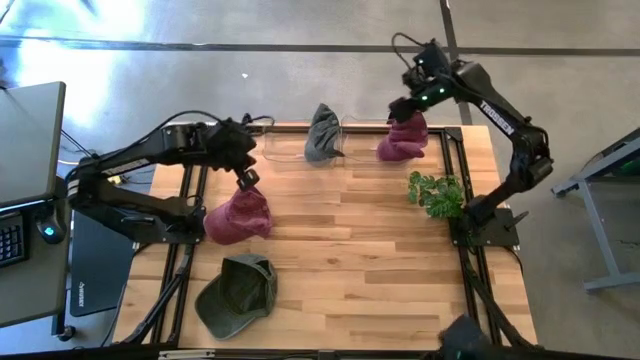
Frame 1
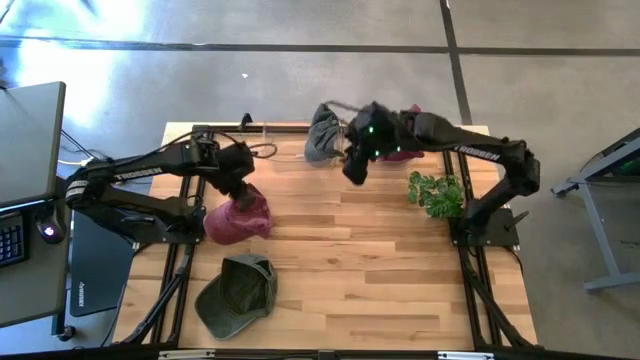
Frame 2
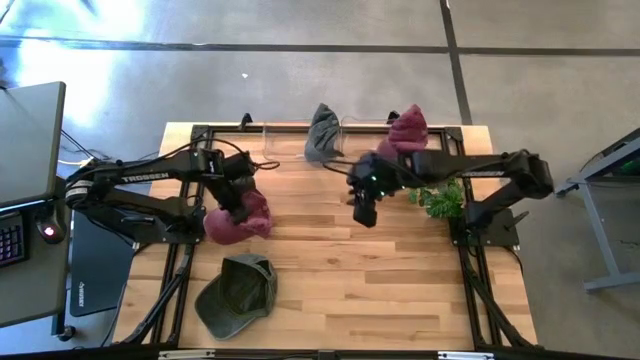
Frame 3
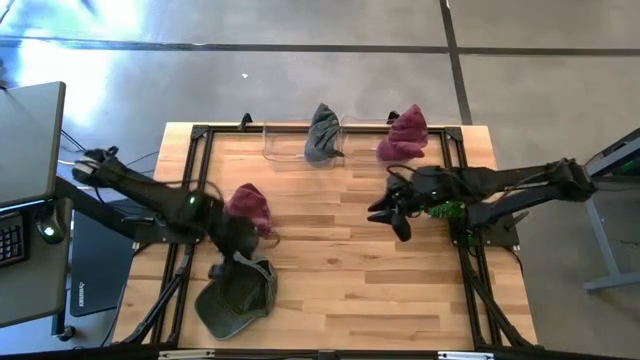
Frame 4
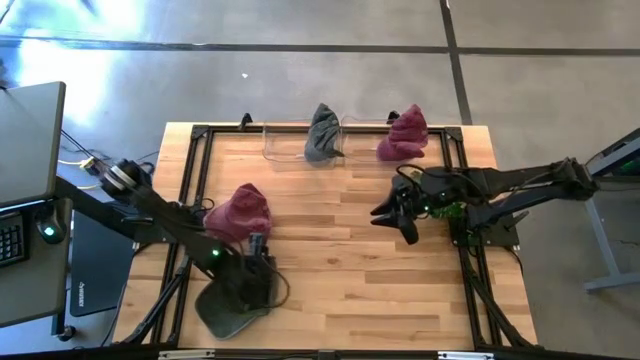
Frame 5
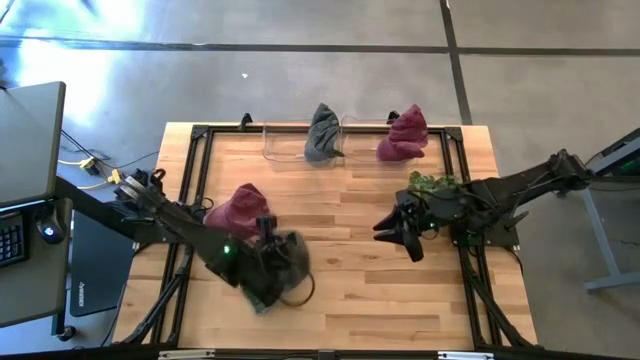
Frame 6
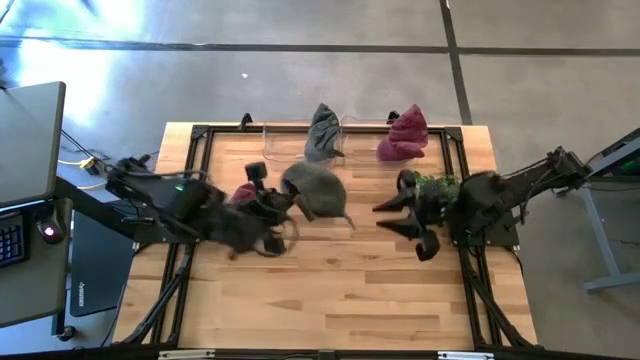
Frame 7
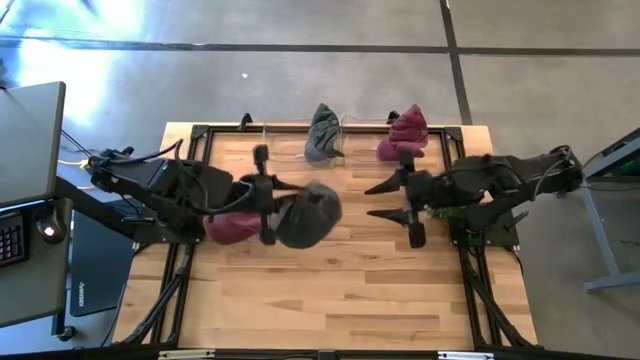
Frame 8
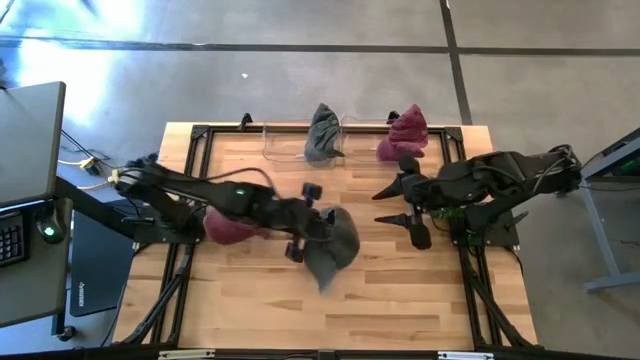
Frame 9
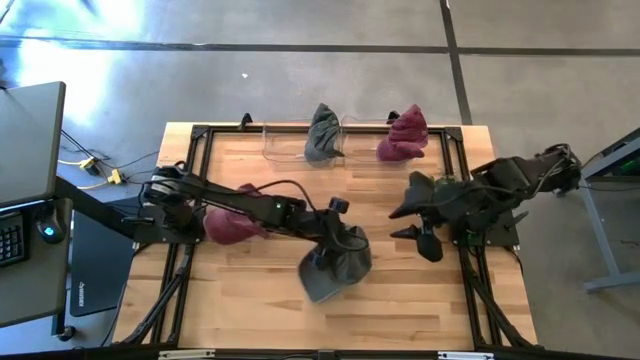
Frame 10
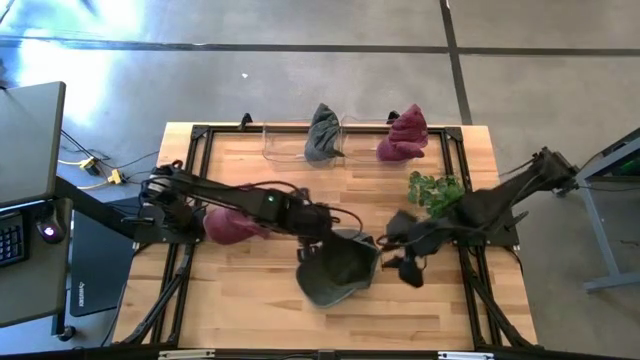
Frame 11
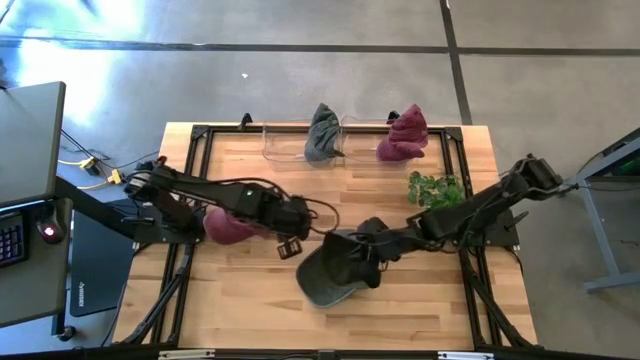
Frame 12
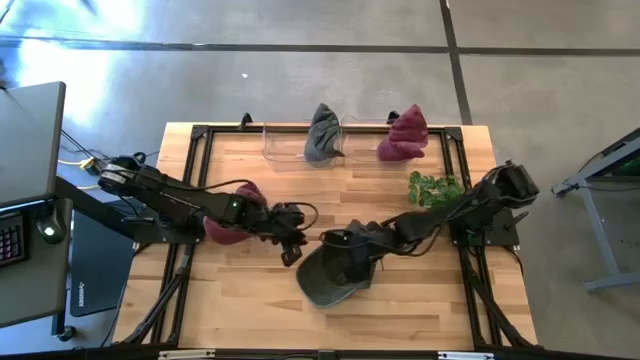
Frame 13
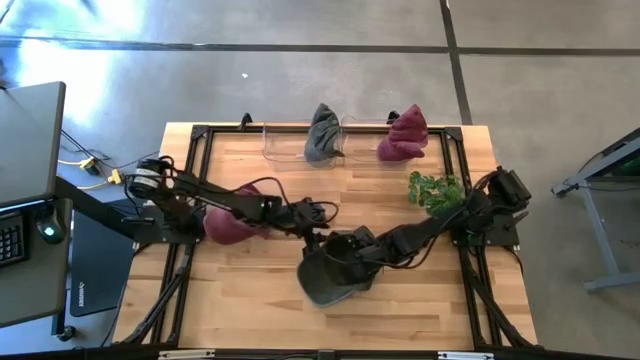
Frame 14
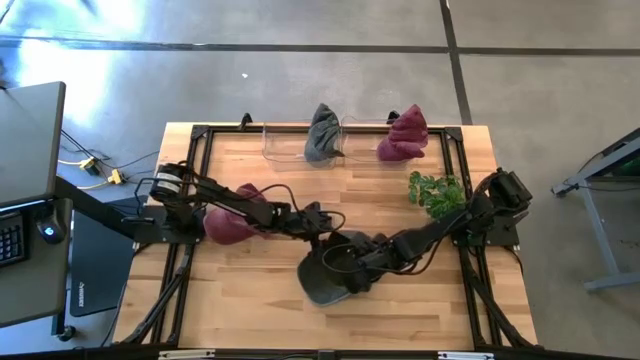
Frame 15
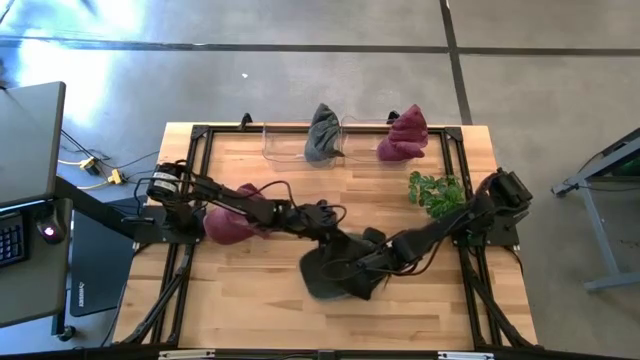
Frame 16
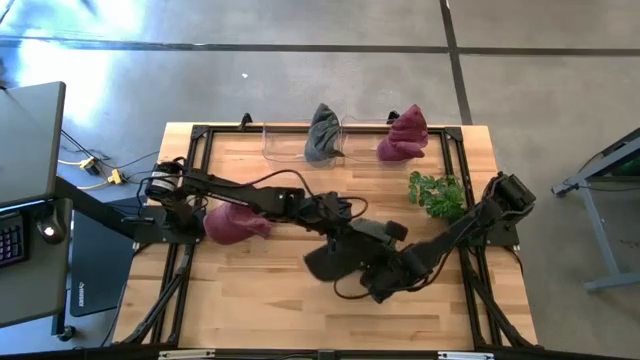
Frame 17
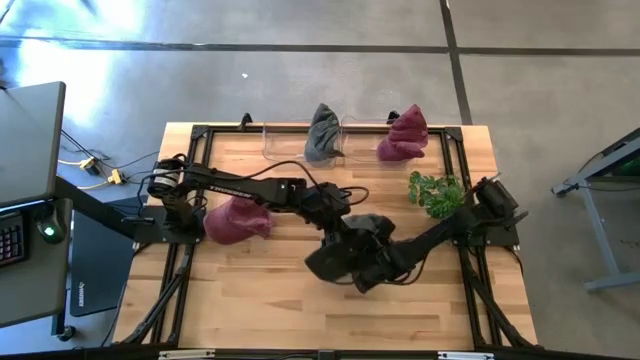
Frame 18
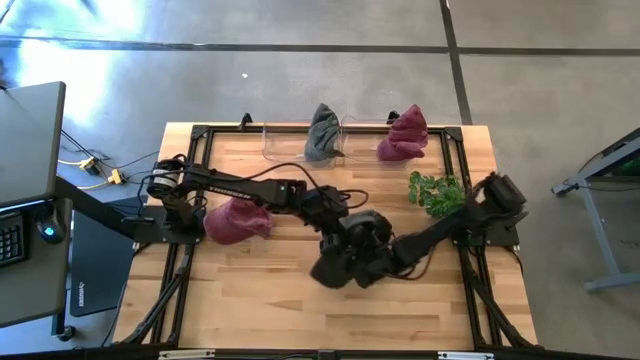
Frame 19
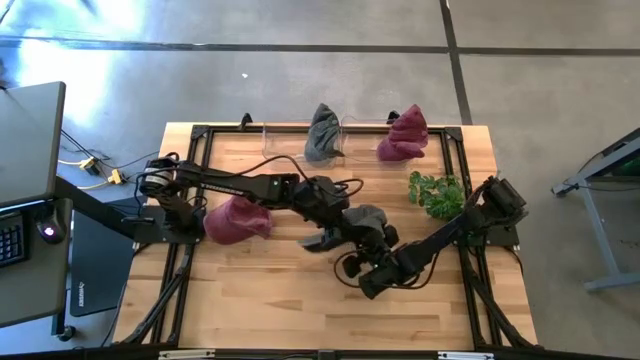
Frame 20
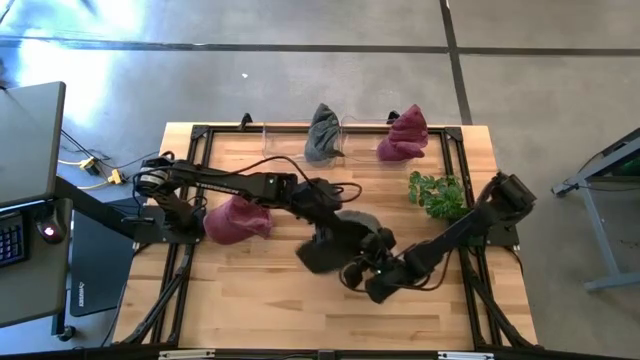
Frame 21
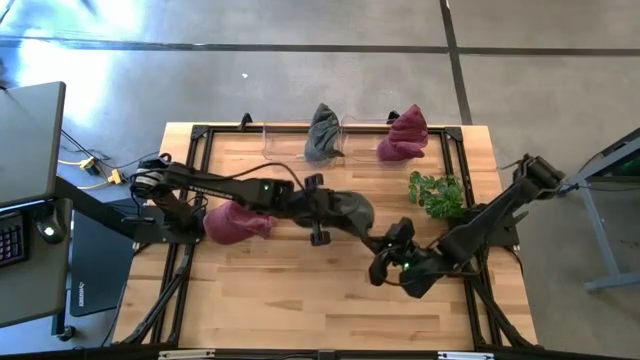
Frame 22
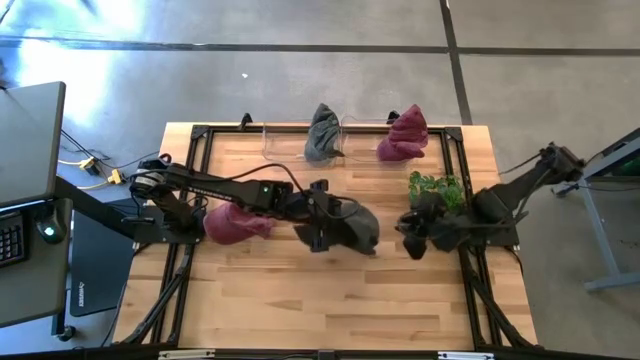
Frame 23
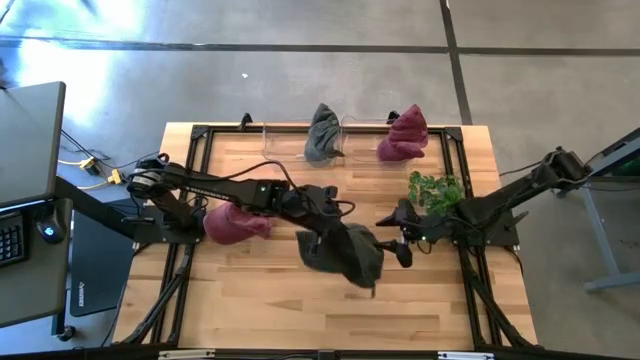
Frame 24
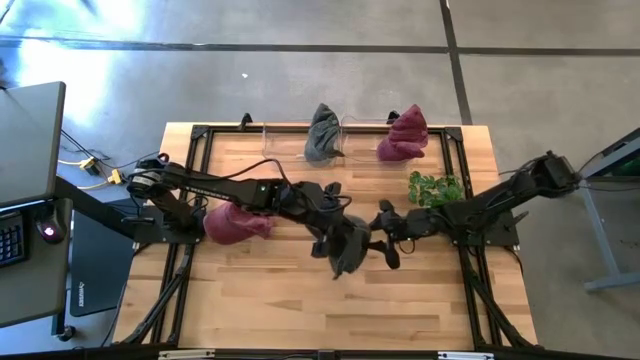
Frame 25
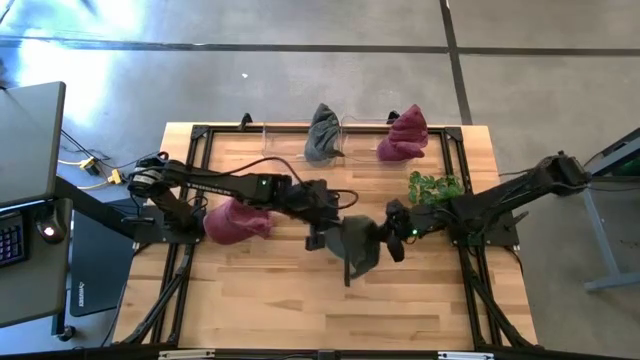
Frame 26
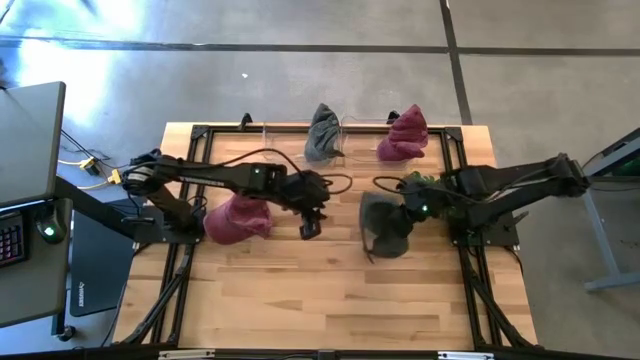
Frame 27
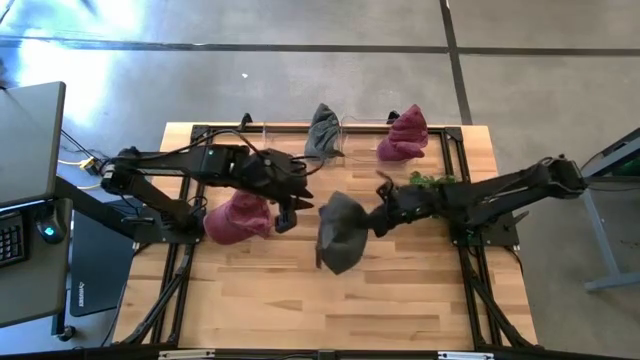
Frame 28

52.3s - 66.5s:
Task: Pick & Place hat
Put the gray cap into the left transparent bin

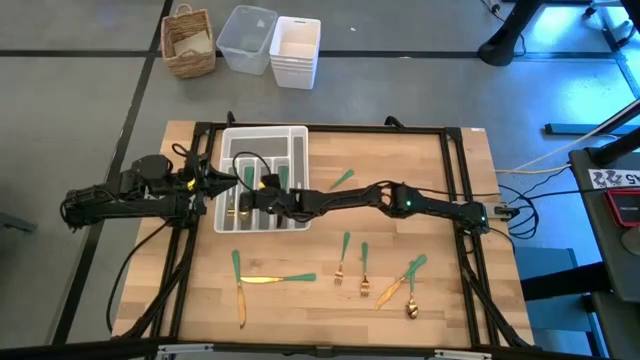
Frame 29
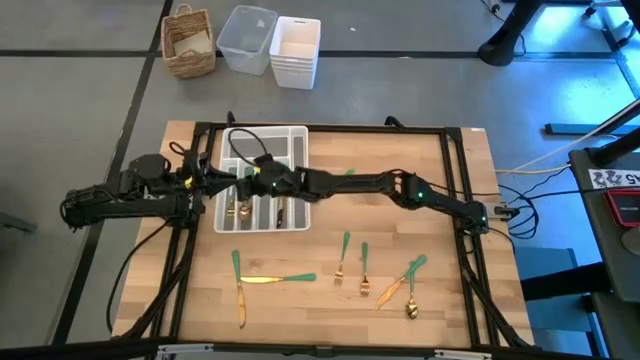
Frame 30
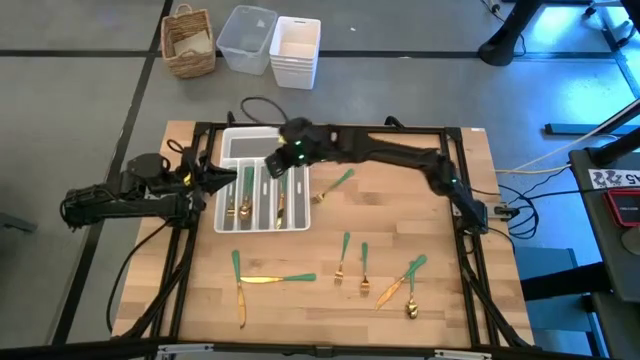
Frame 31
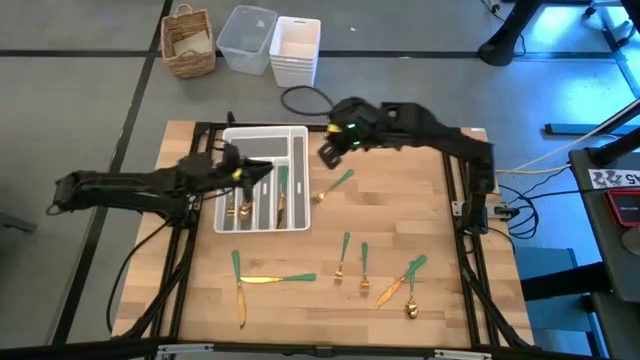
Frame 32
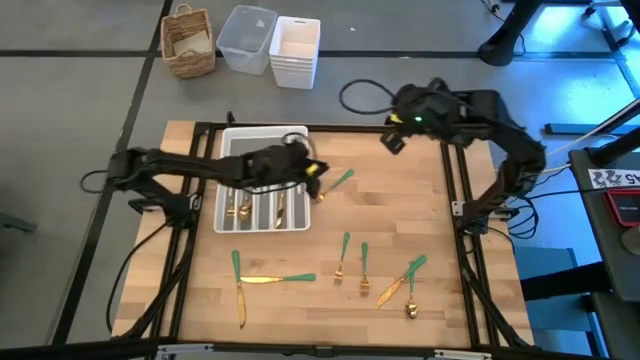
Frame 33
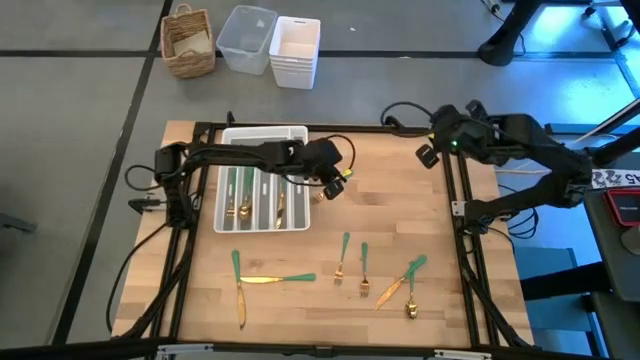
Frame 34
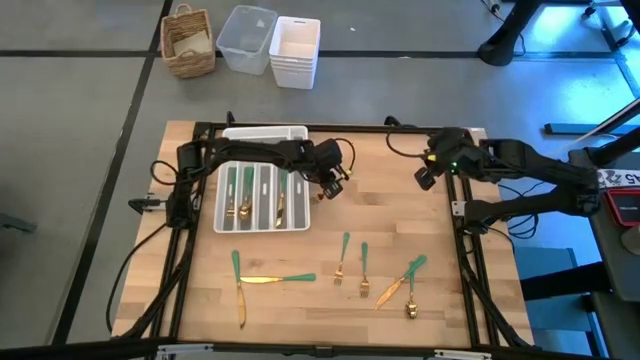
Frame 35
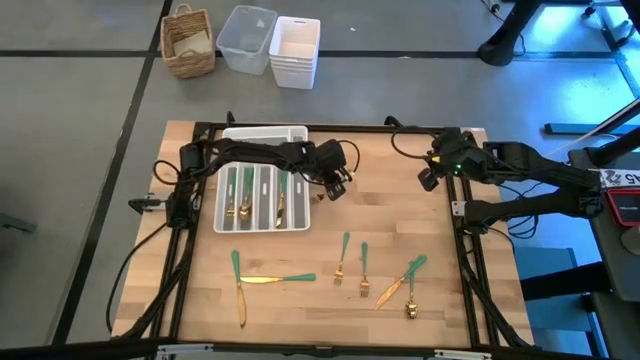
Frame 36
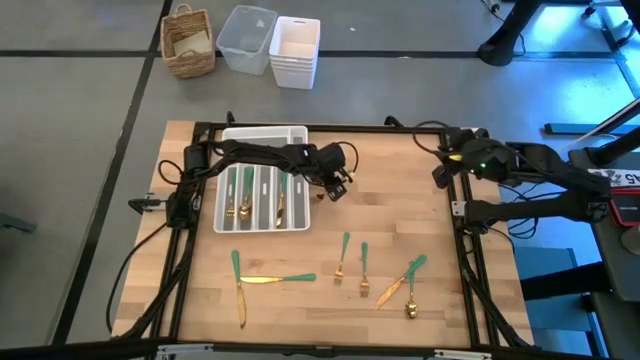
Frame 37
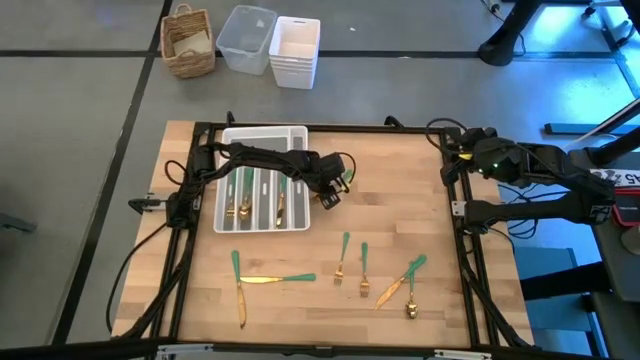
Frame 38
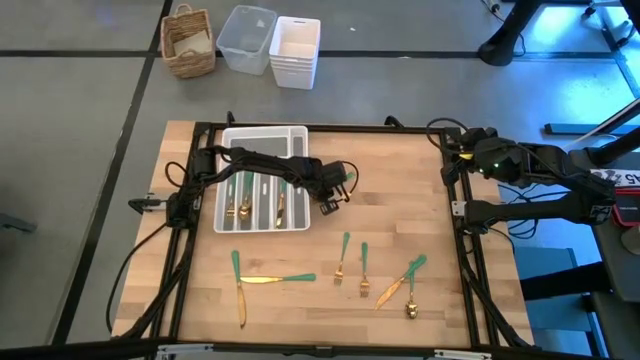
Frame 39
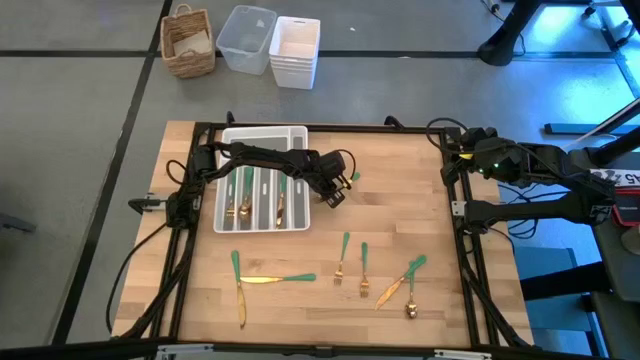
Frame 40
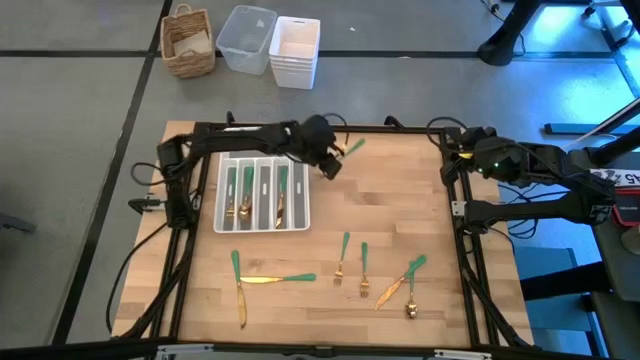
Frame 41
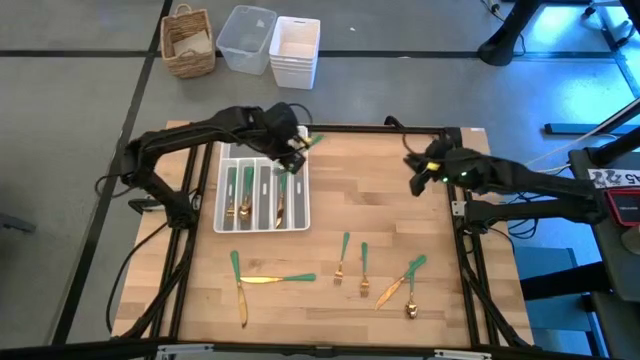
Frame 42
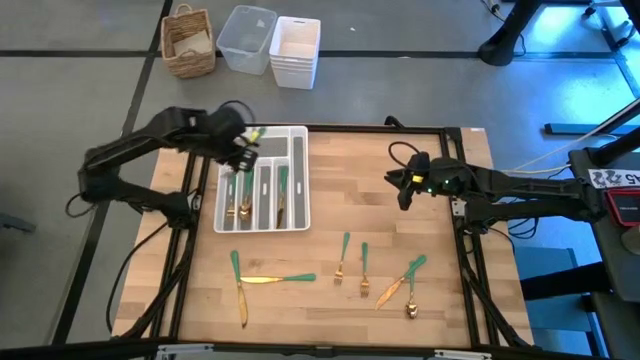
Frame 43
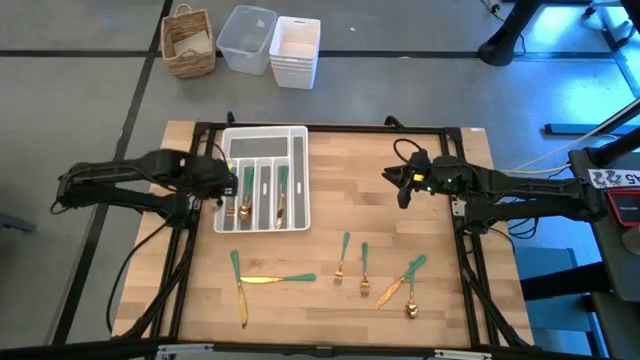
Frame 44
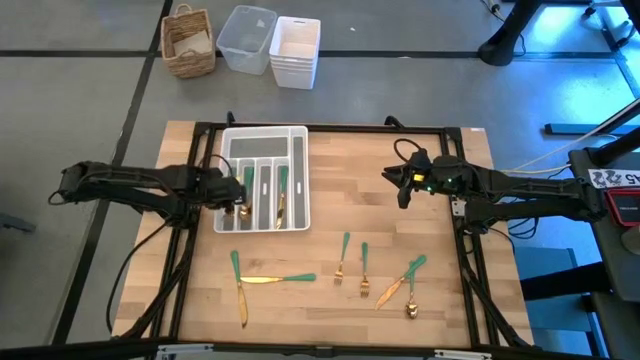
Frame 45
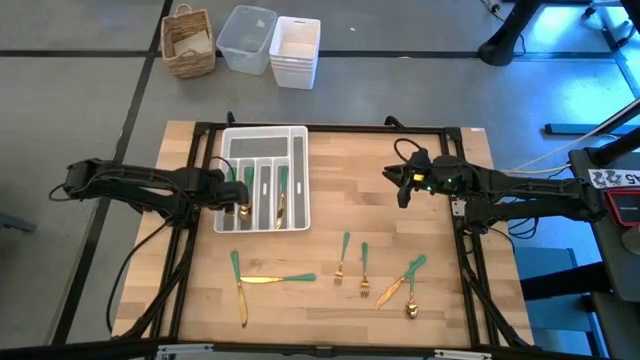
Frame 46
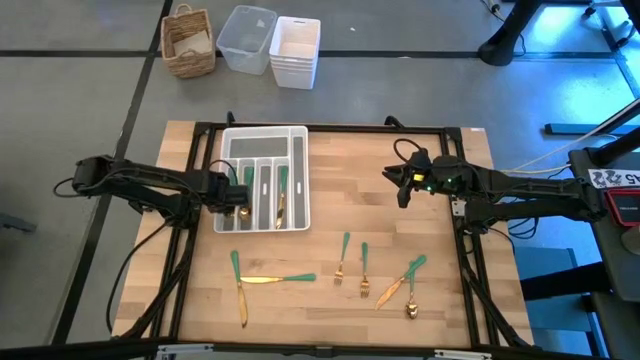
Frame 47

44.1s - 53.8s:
Task: Sort silverware
Put the green fork into the white silverware tray
